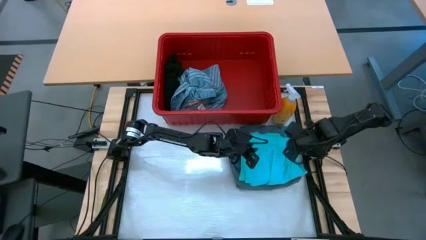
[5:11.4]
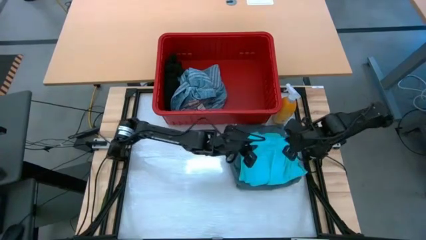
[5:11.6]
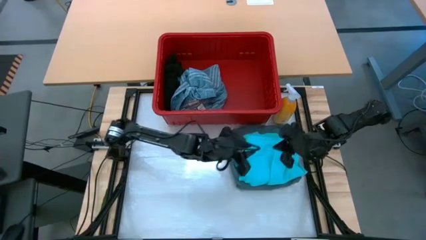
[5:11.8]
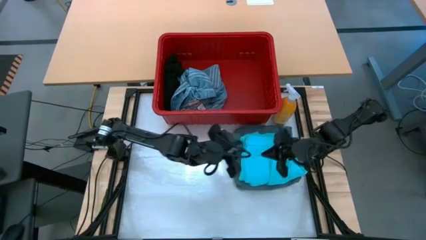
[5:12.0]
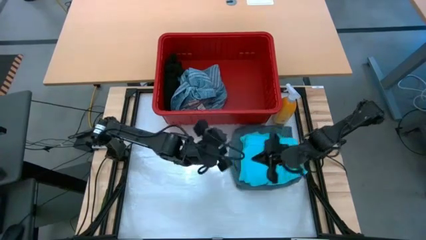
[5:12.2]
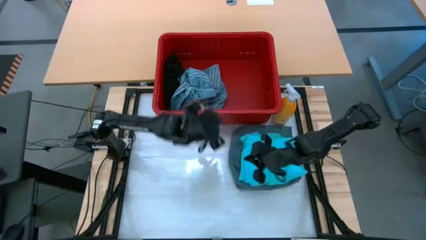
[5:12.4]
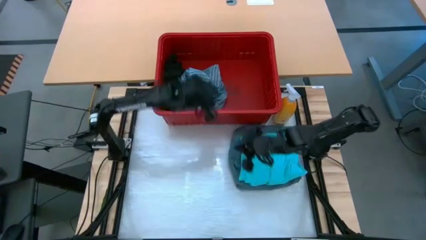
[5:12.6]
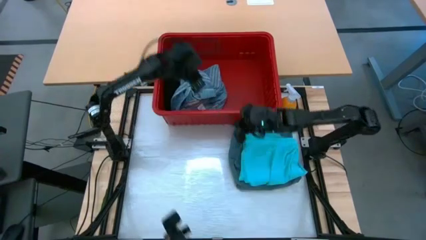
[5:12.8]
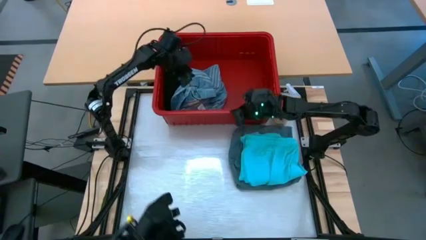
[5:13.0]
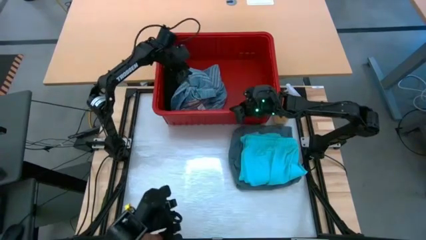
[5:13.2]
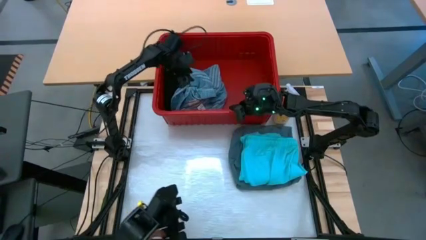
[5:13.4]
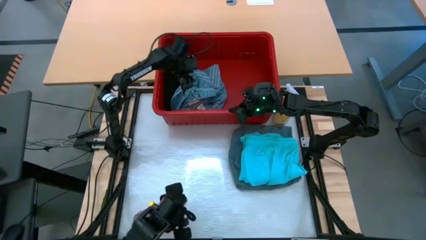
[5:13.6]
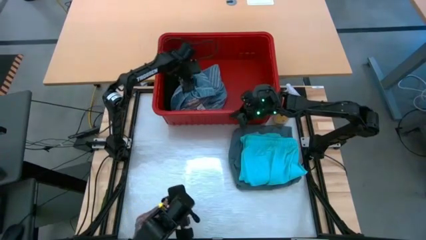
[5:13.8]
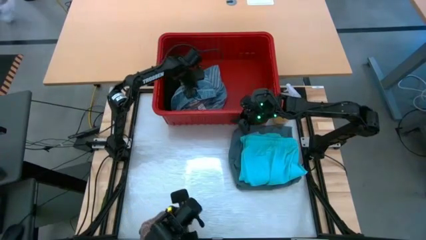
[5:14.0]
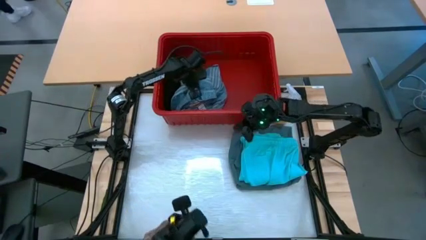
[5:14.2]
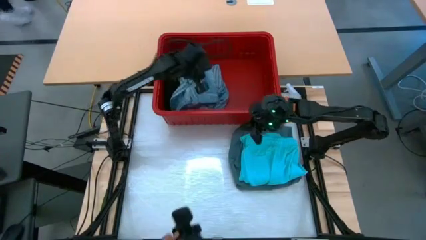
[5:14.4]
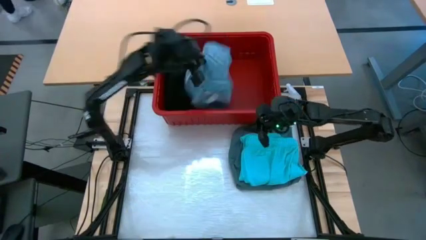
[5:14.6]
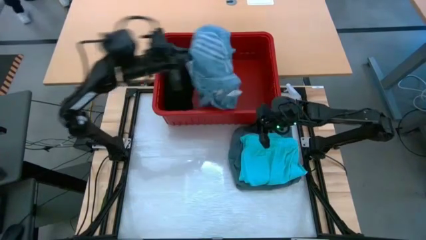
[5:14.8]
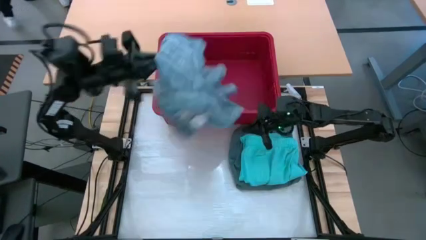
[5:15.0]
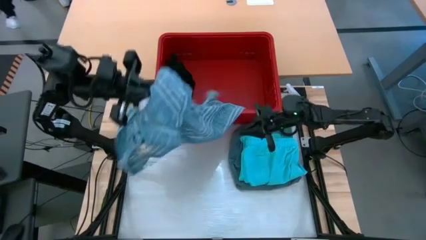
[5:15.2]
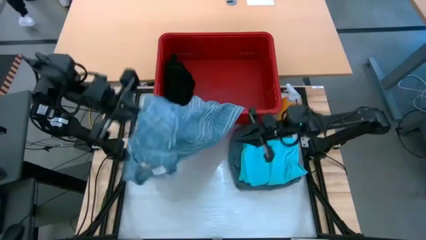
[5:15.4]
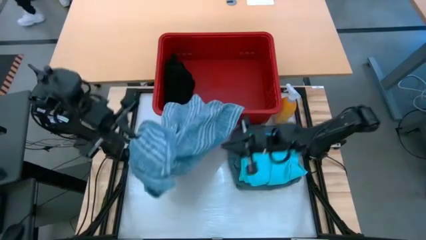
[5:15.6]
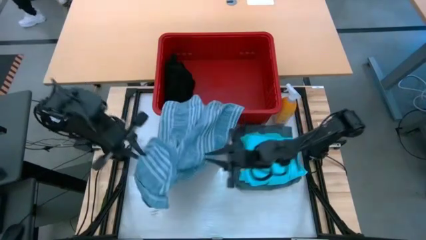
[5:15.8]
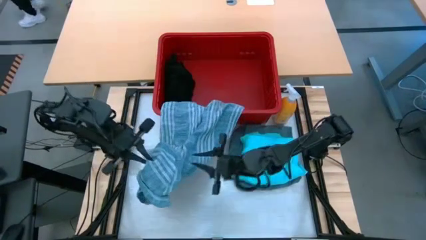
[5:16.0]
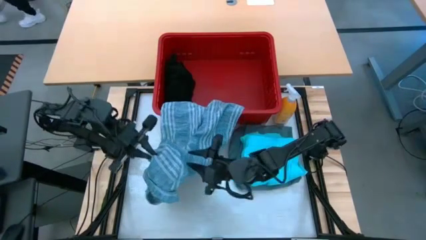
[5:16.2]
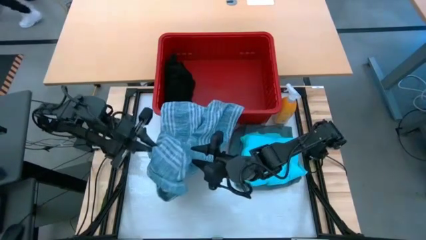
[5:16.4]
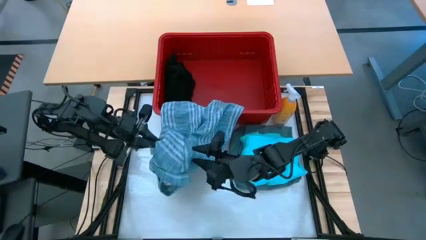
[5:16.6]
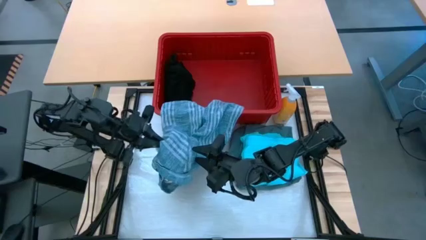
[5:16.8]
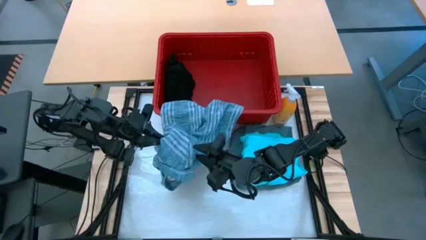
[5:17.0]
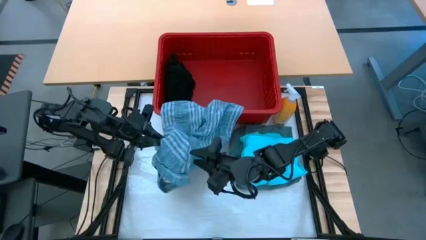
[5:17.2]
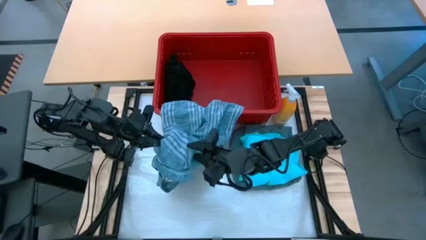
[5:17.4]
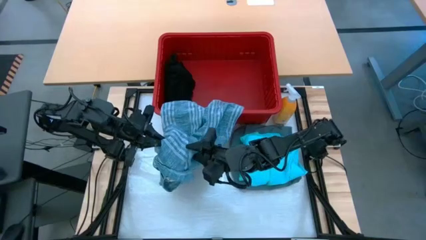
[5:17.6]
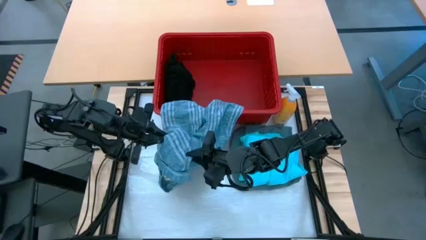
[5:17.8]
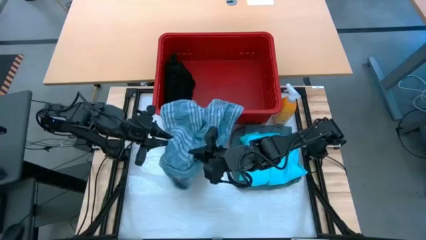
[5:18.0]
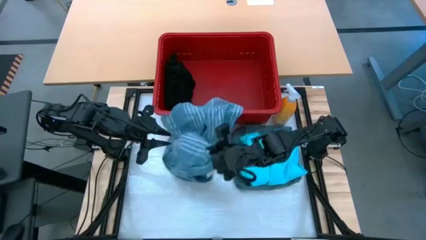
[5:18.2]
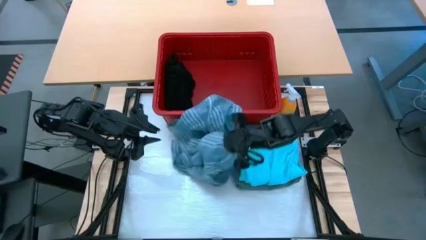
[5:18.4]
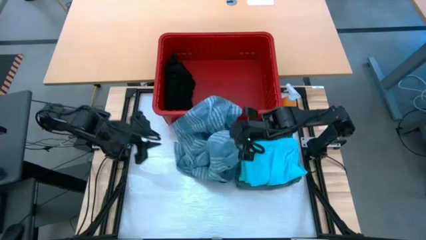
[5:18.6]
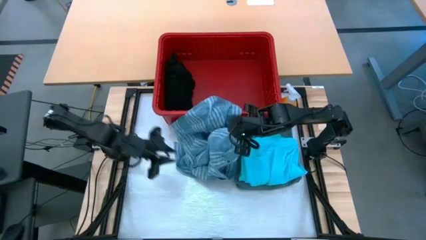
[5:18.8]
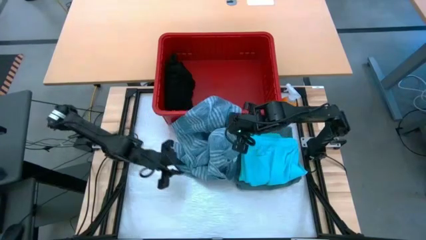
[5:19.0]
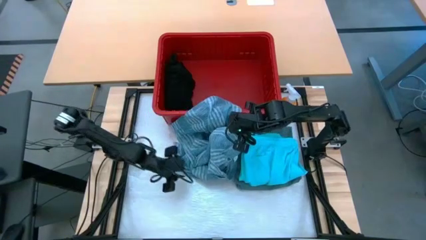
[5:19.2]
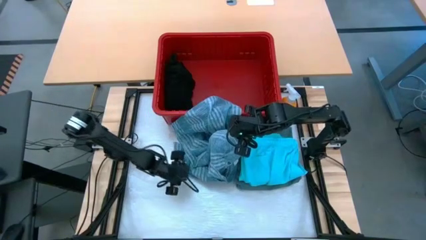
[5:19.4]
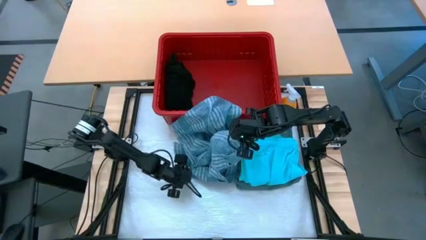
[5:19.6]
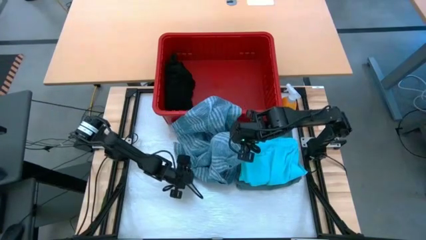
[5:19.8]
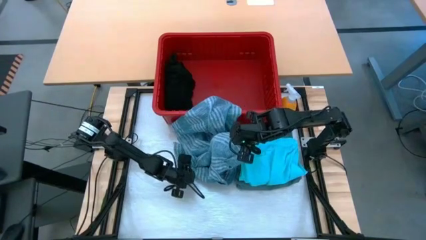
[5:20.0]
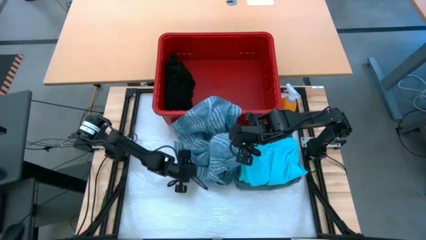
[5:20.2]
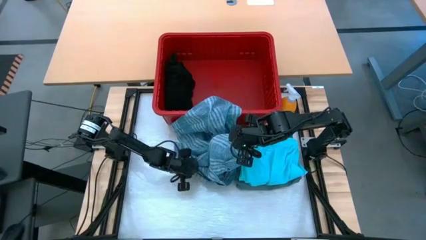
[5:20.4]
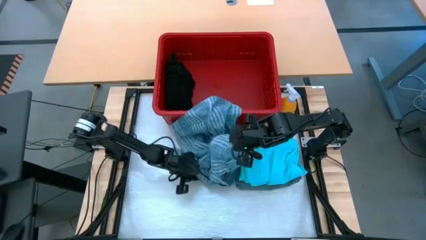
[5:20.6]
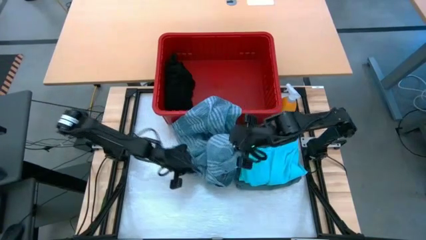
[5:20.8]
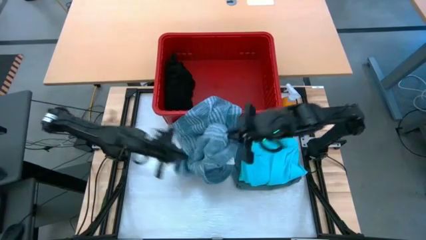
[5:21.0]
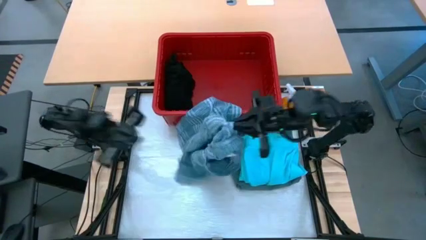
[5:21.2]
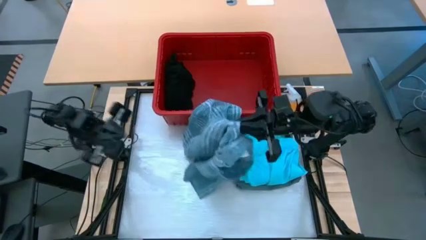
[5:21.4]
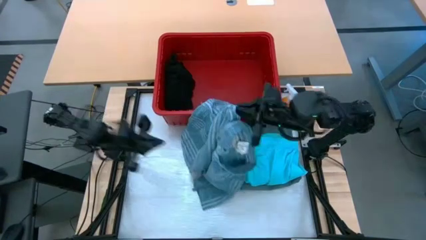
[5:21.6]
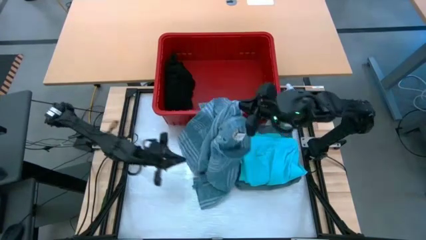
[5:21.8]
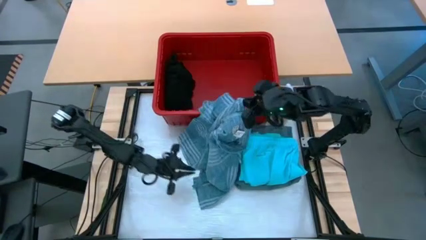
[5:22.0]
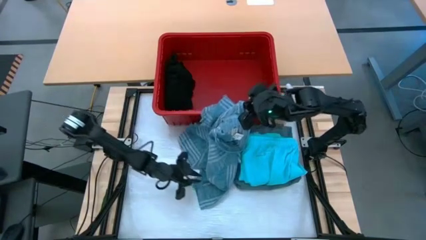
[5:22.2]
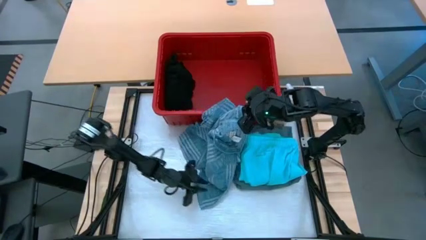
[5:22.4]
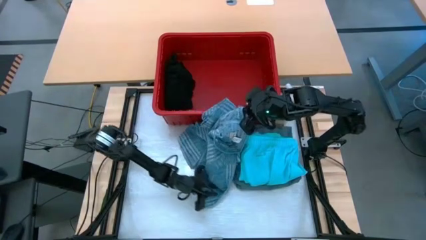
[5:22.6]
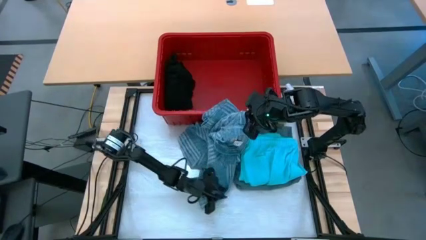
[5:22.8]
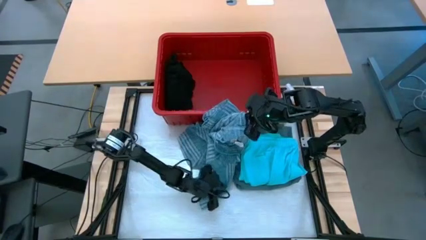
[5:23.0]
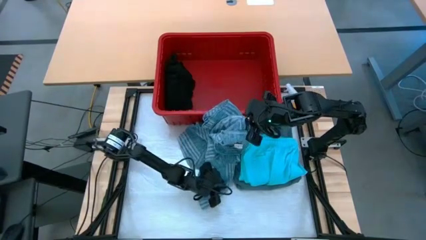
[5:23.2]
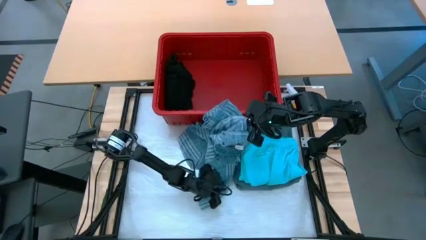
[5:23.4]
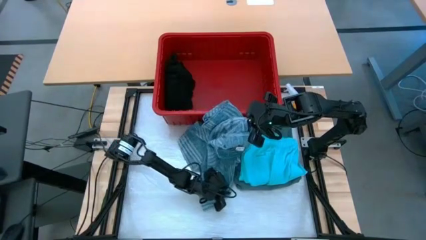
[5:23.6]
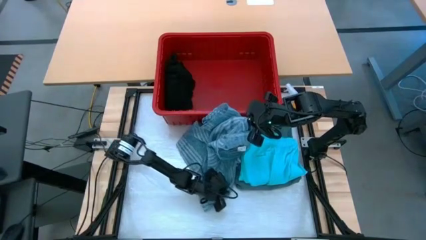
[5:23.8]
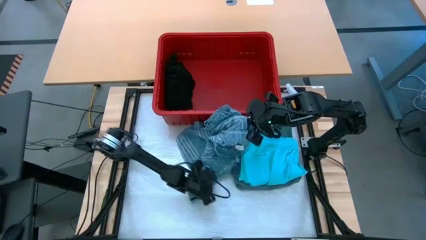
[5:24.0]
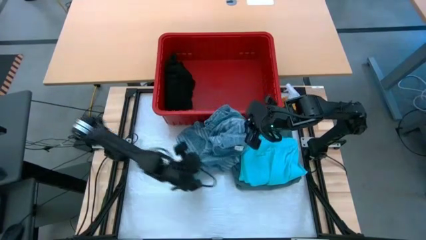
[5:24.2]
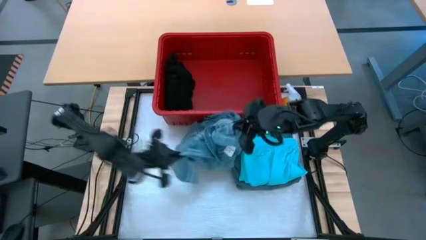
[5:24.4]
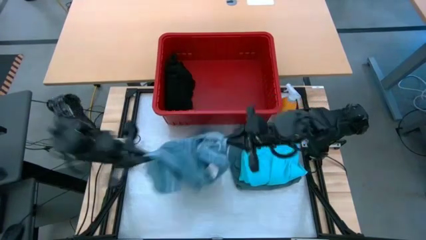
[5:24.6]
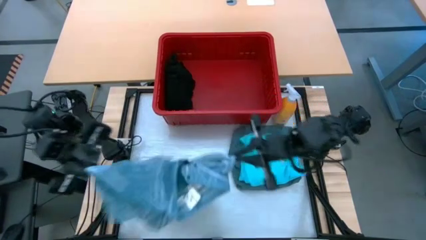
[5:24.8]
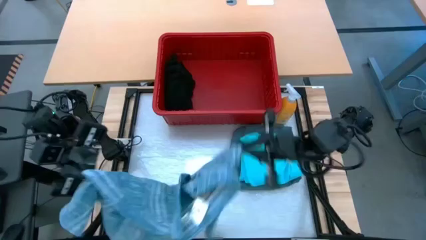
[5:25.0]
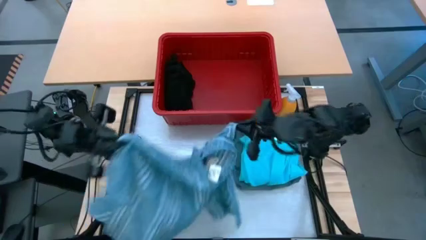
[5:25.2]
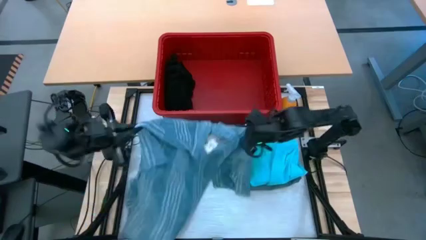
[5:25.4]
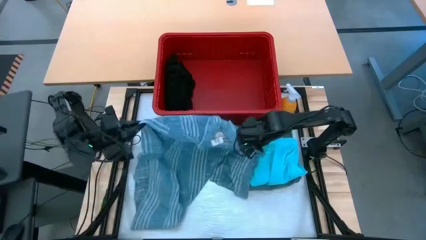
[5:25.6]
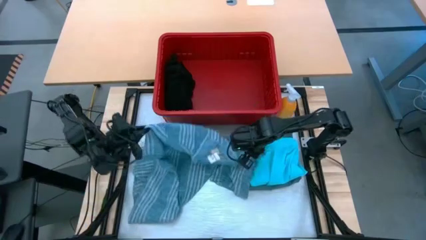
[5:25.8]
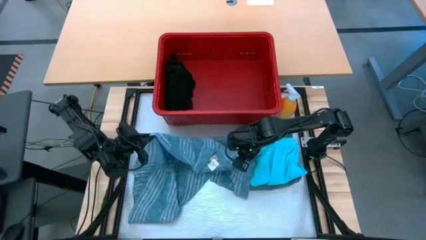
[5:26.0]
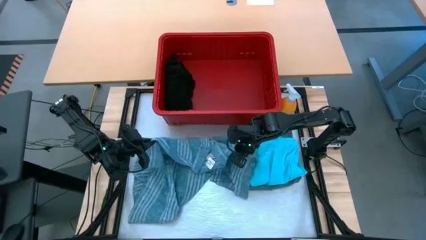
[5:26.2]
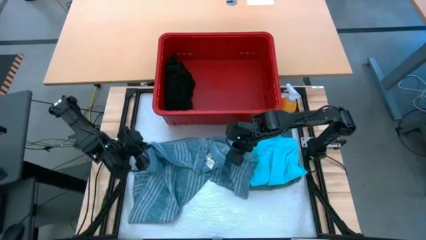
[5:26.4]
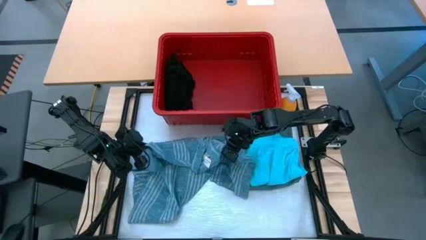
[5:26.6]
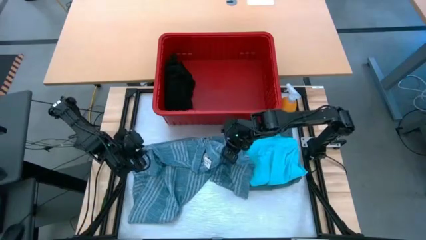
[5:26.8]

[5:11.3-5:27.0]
Task: Fold Laundry from Bin
Remove the blue shirt from the red laundry bin
